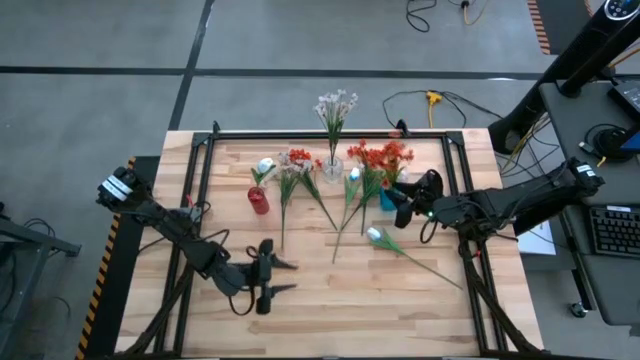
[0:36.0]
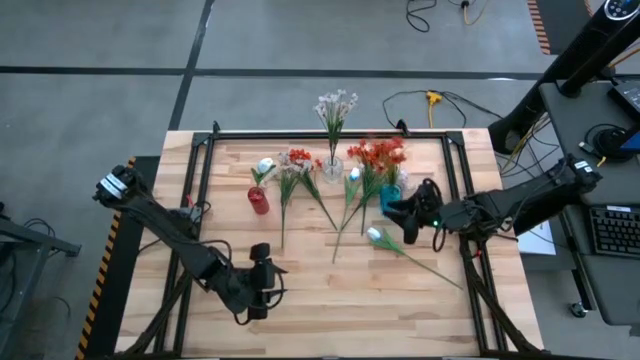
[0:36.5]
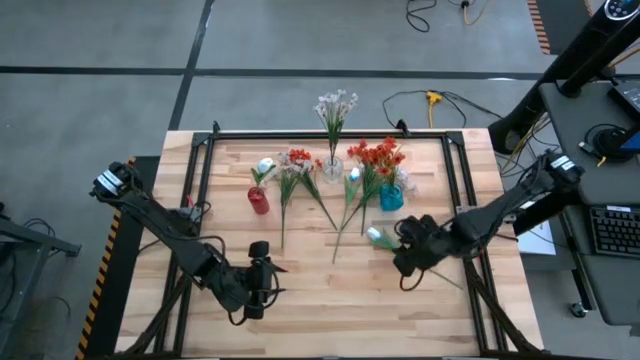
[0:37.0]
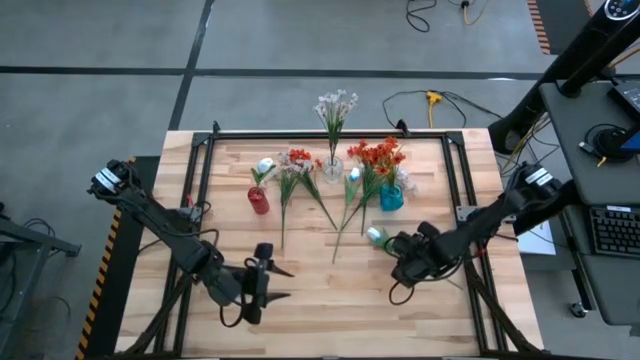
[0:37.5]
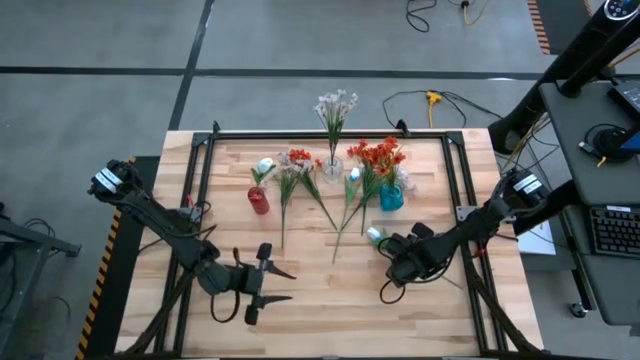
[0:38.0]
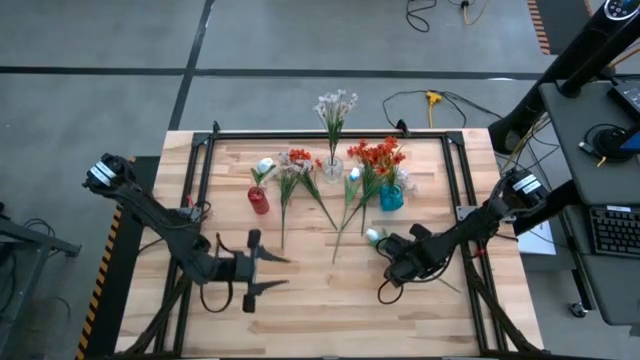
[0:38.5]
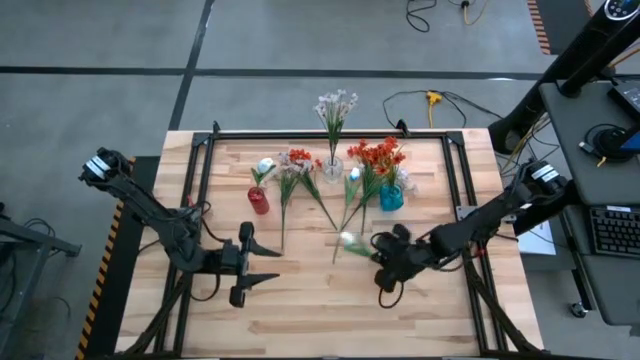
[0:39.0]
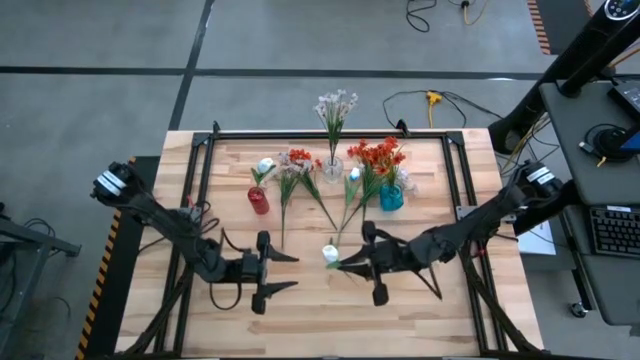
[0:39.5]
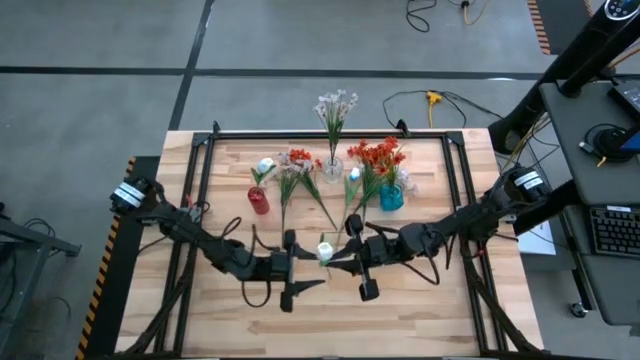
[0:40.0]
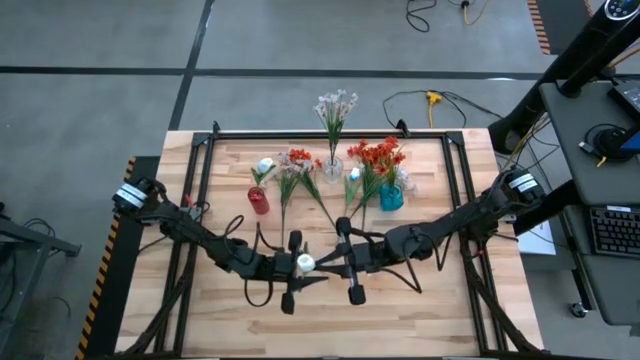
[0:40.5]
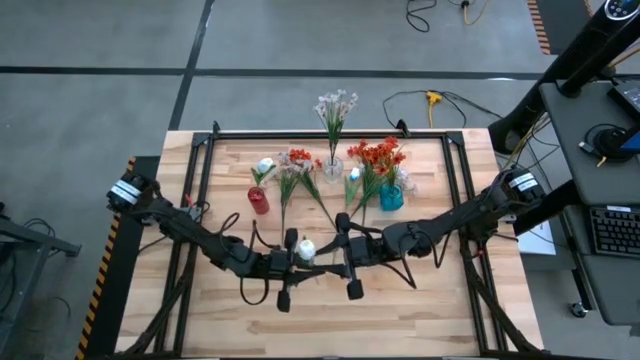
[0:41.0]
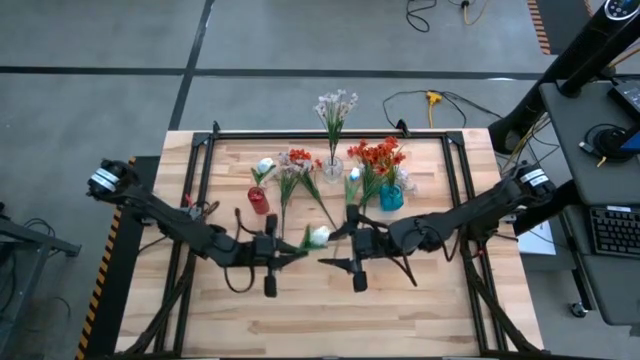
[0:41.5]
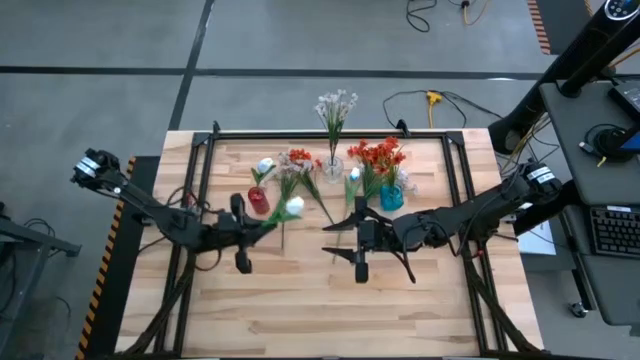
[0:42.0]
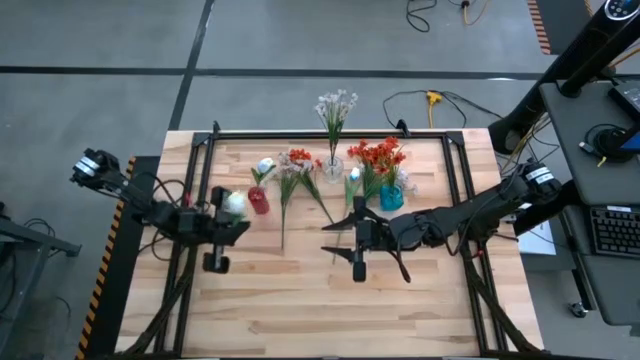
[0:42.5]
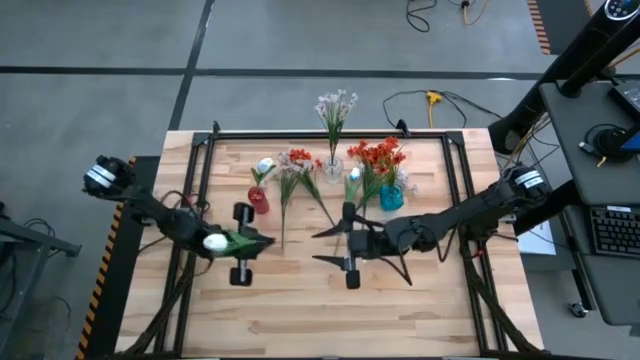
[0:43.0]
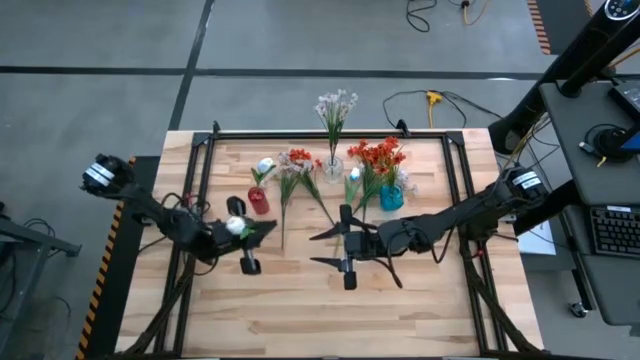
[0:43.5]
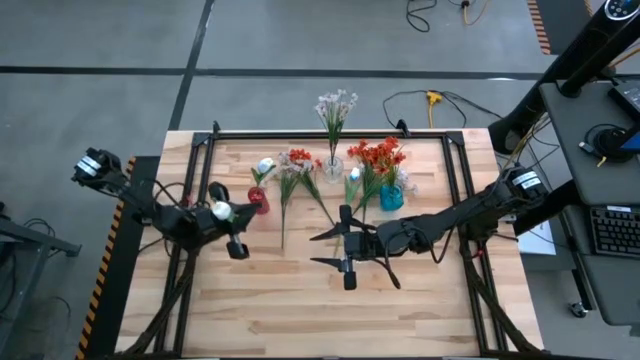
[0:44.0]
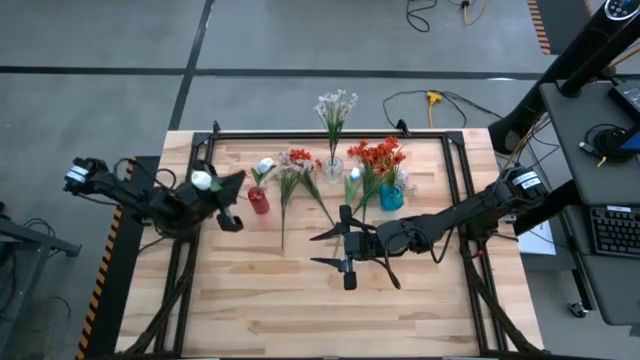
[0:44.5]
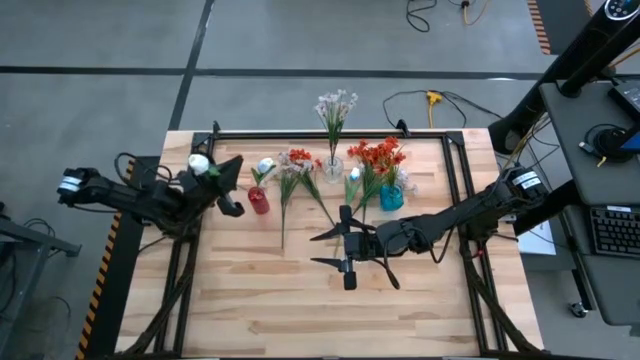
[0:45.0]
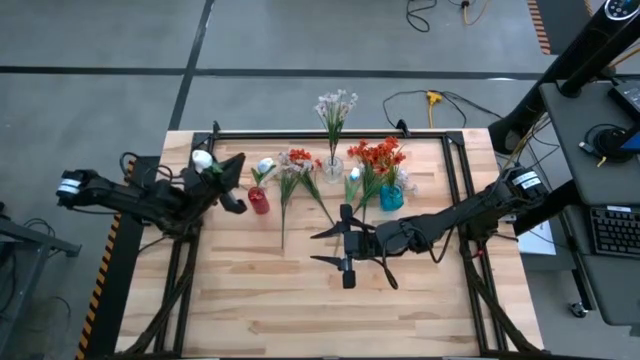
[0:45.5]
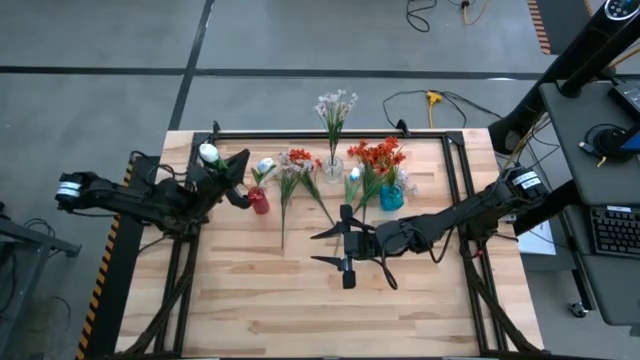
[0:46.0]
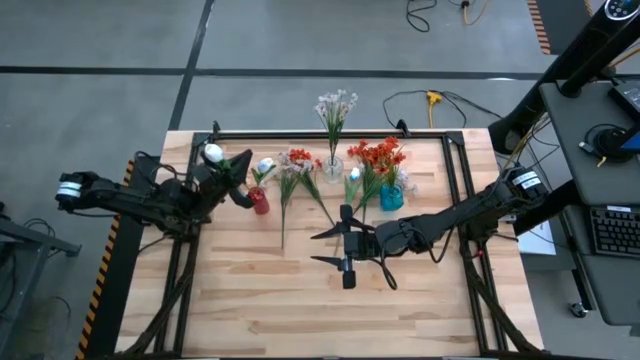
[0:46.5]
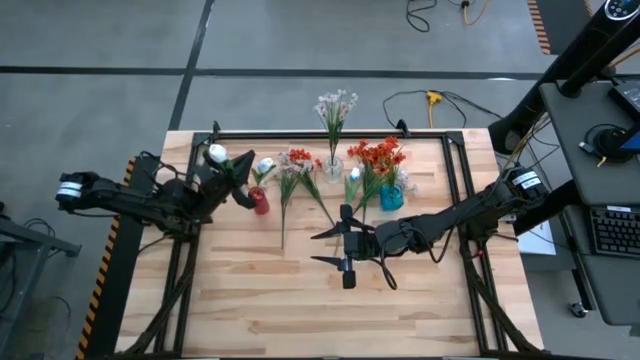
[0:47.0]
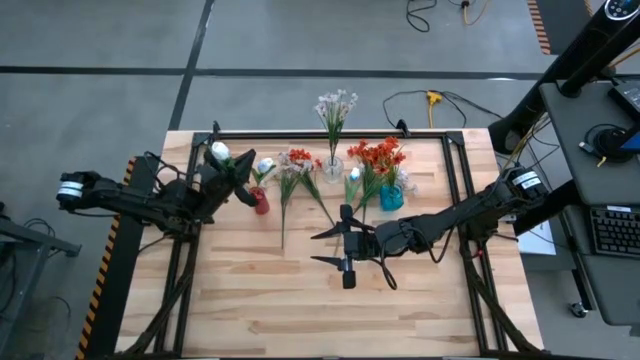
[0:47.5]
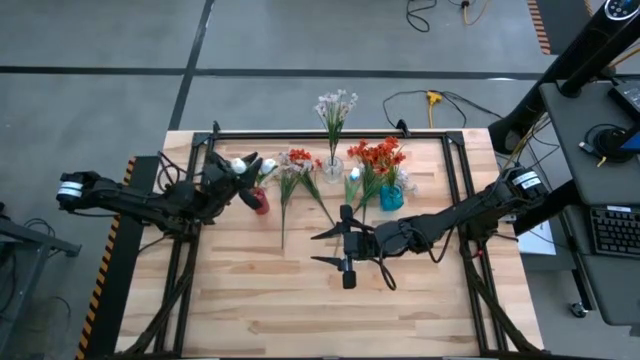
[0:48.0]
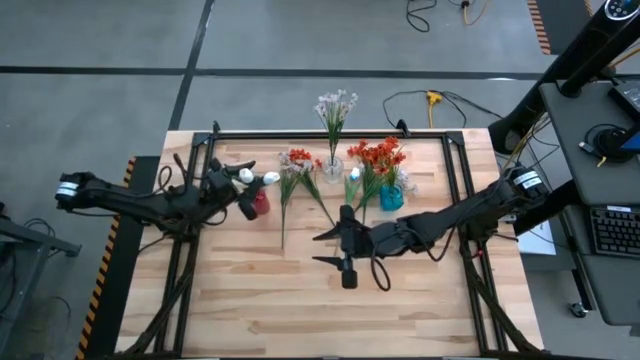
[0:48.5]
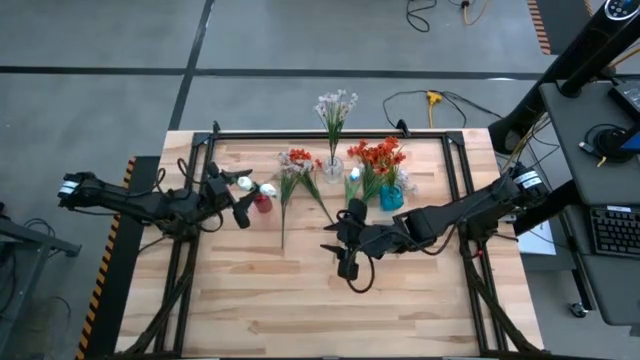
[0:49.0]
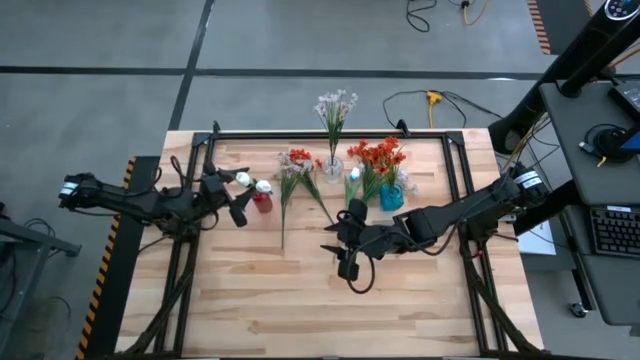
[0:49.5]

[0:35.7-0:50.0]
Task: Sort flowers into vase by color
Put the bottom white flower into the red vase

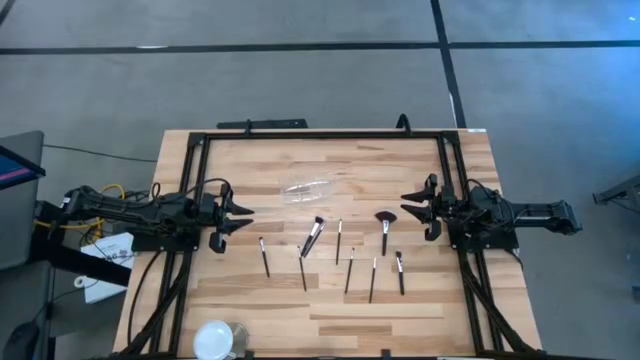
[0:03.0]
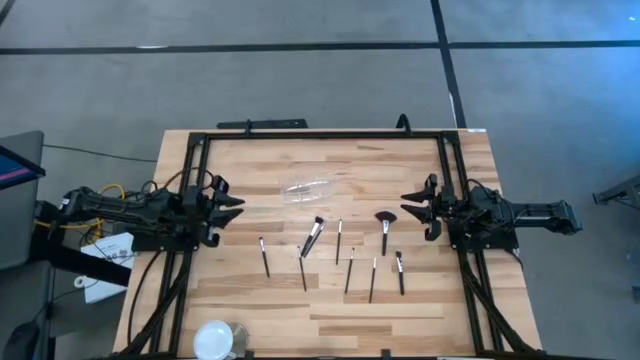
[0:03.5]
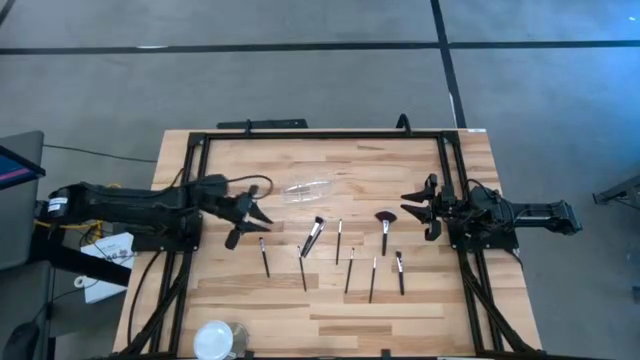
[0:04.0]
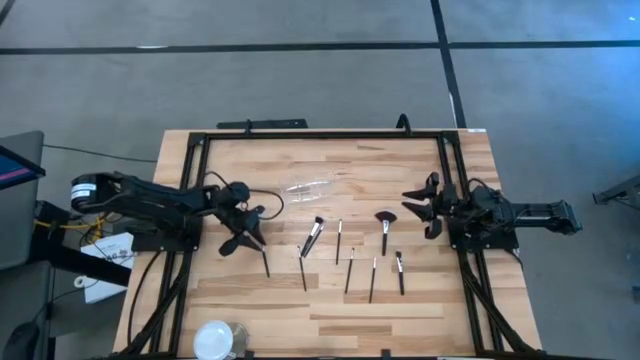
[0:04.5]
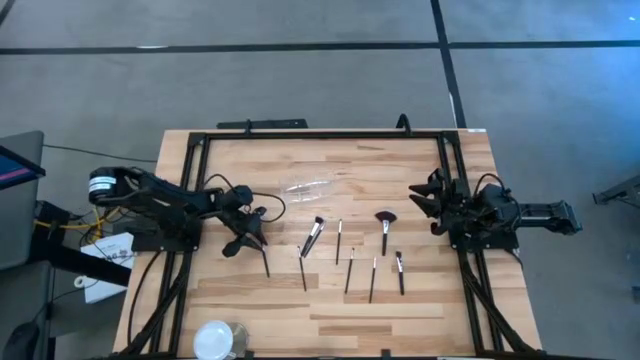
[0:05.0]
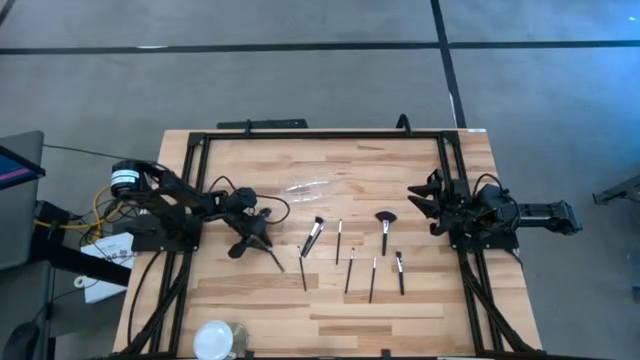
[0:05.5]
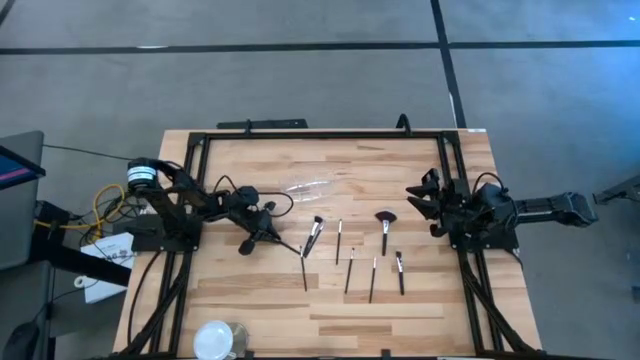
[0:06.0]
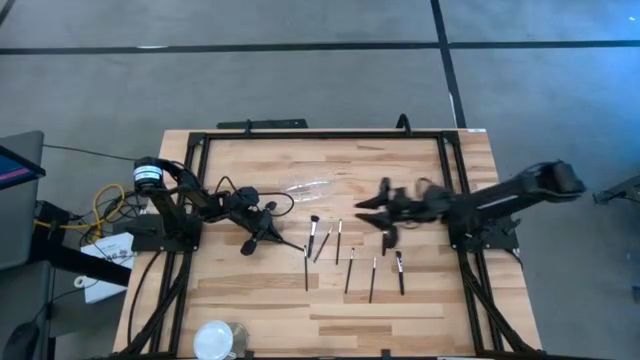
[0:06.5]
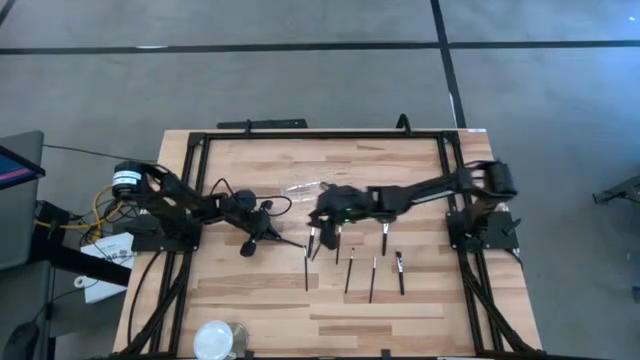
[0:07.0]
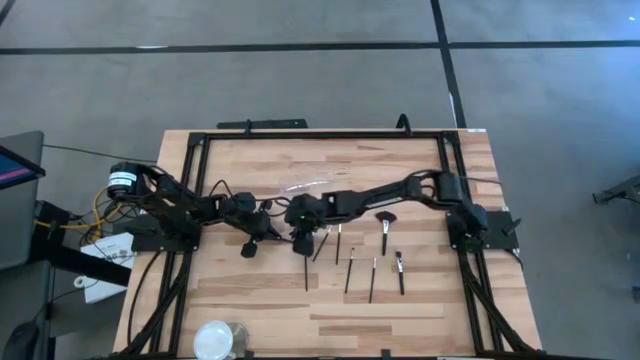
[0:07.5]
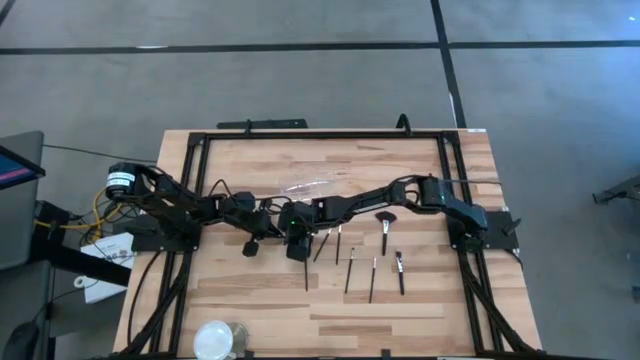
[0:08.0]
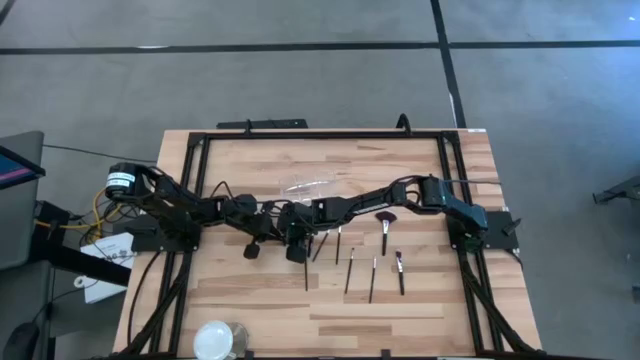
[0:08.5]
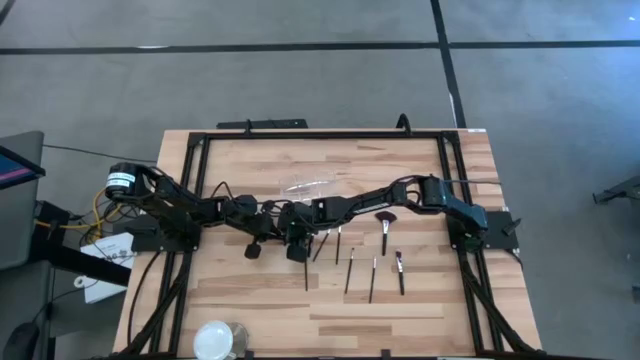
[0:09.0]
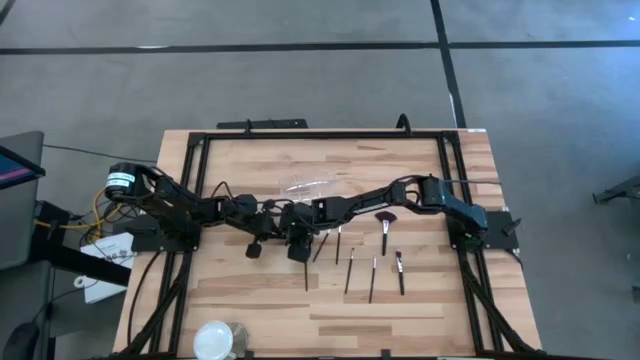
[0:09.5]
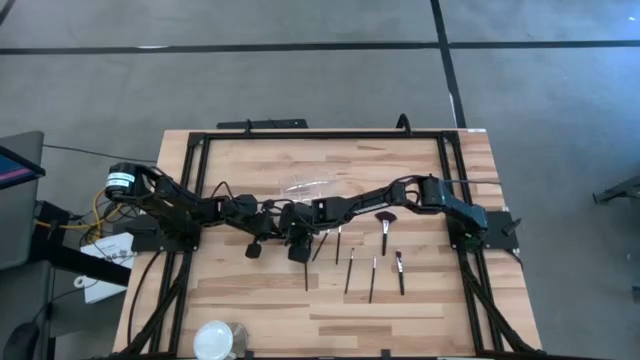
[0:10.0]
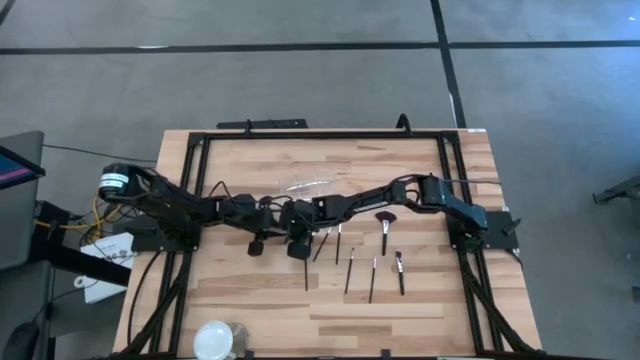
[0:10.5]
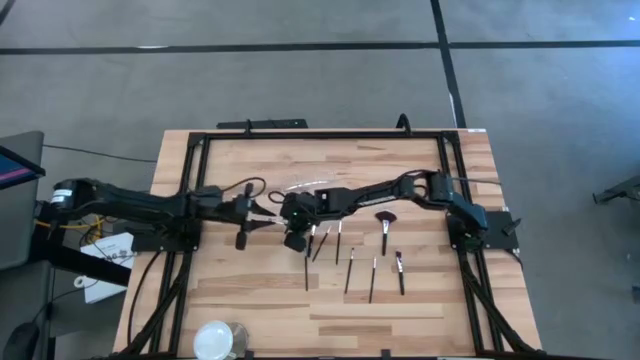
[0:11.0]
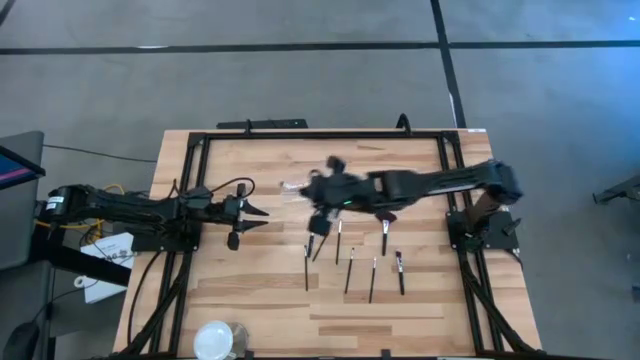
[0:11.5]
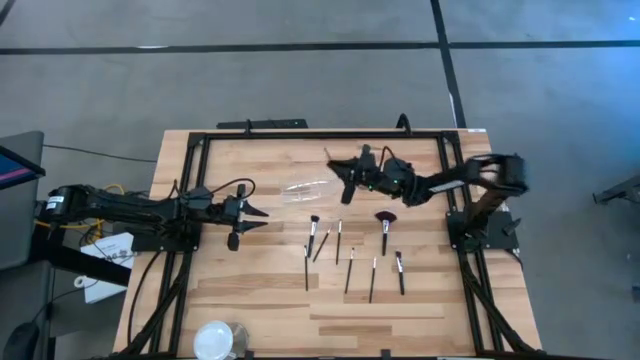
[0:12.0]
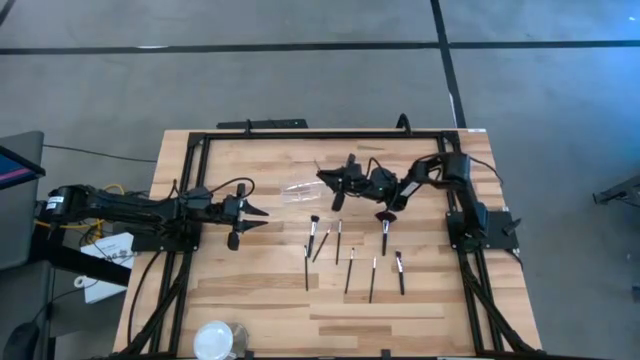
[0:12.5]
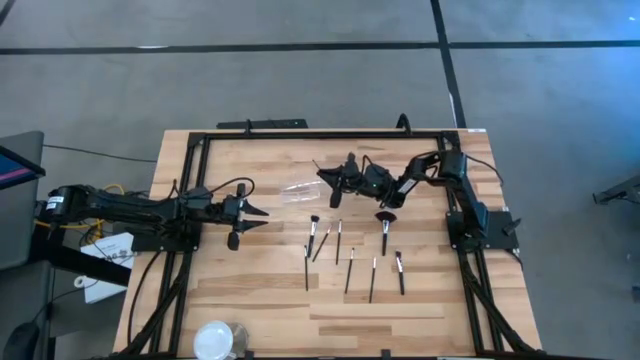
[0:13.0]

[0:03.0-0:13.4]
Task: Put items in baskets/containers
Put the black eyeshadow brush into the transparent organizer
